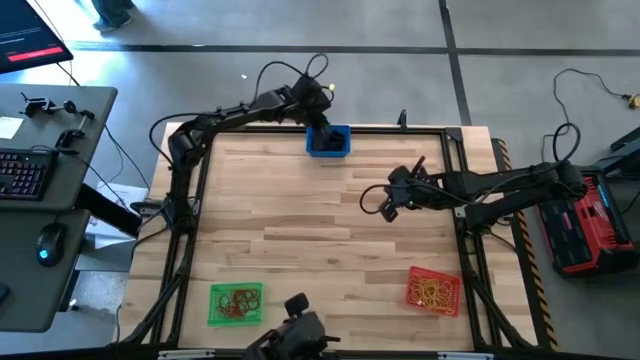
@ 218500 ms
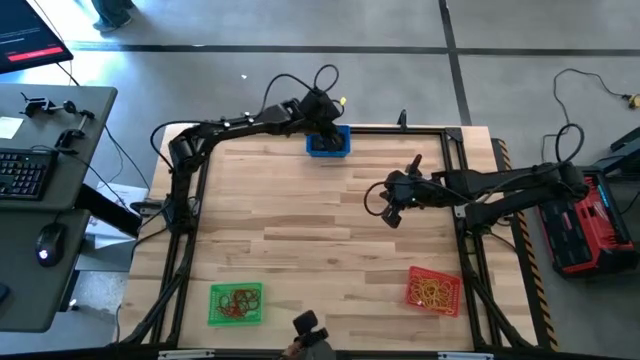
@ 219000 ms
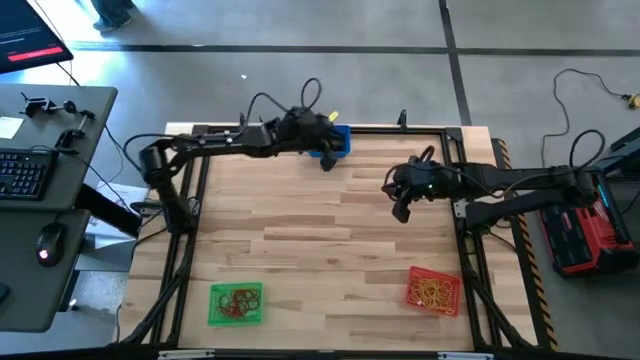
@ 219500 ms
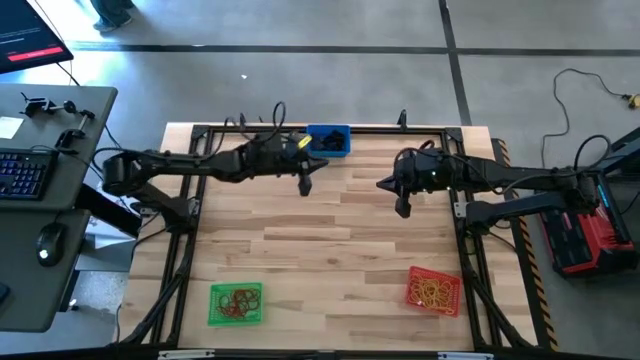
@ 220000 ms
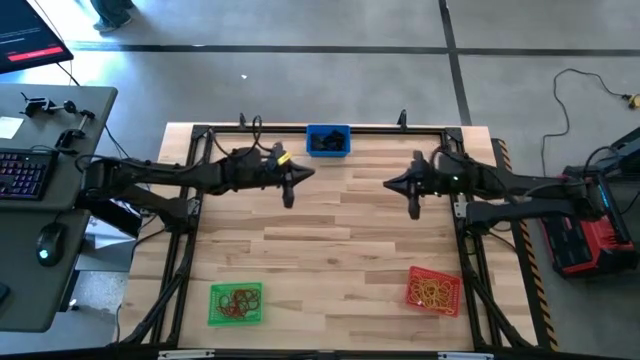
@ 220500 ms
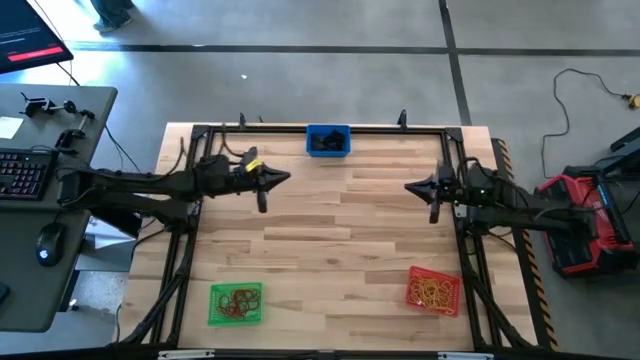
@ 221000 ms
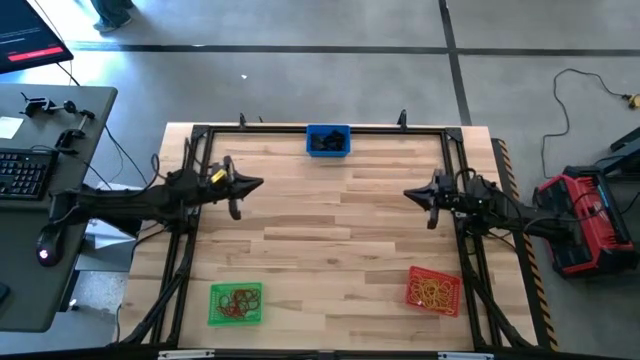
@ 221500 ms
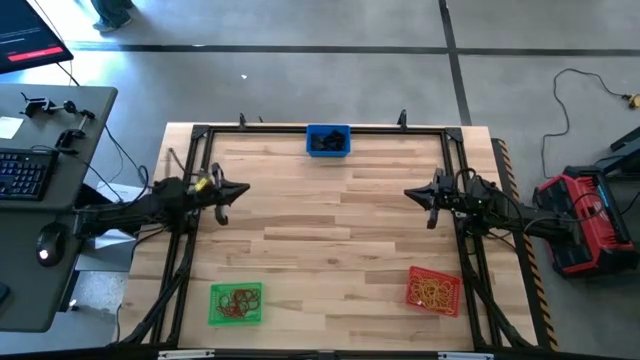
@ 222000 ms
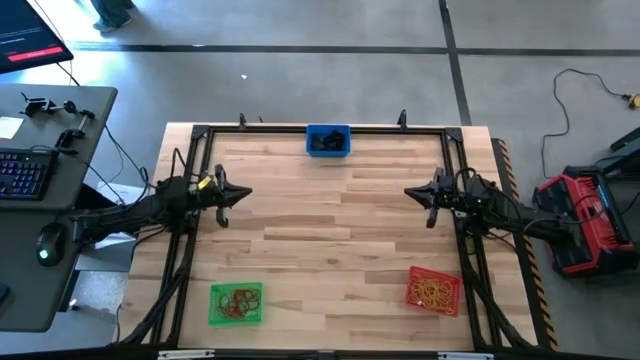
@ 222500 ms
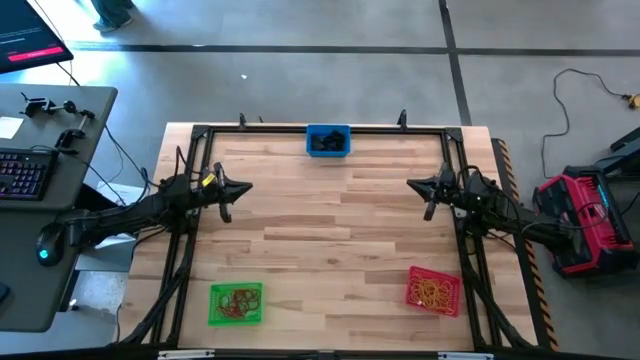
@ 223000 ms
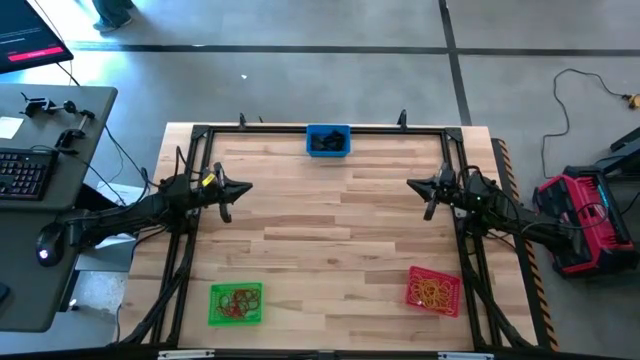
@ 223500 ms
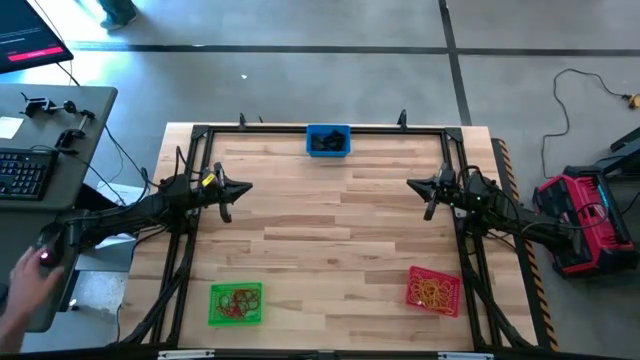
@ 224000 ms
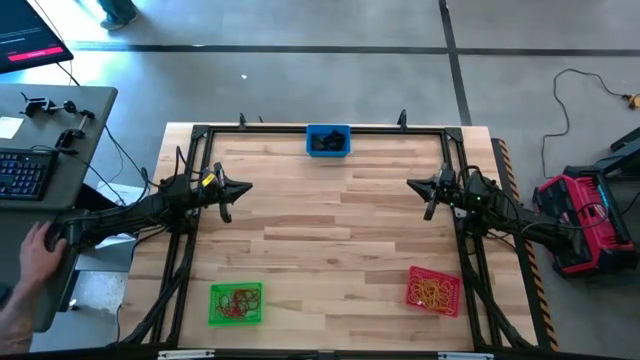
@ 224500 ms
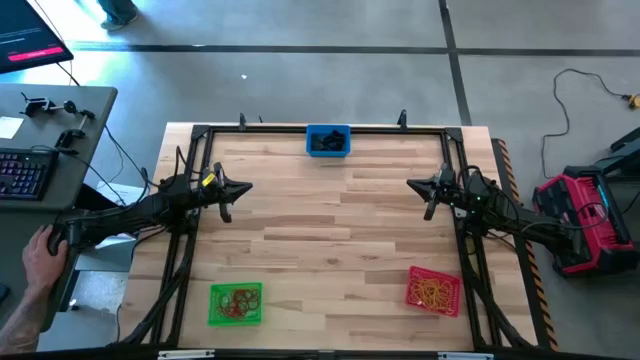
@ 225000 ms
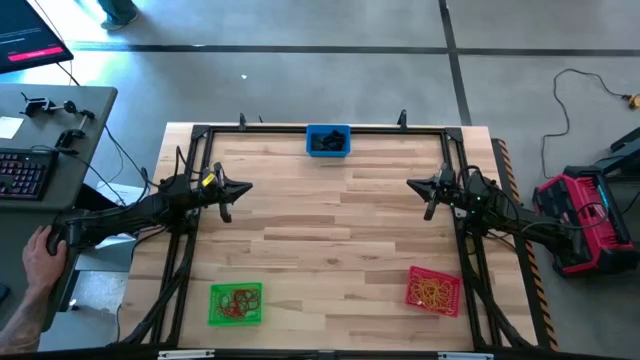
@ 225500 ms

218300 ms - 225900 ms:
Task: Sort rubber bands into baskets
Return to Home Position

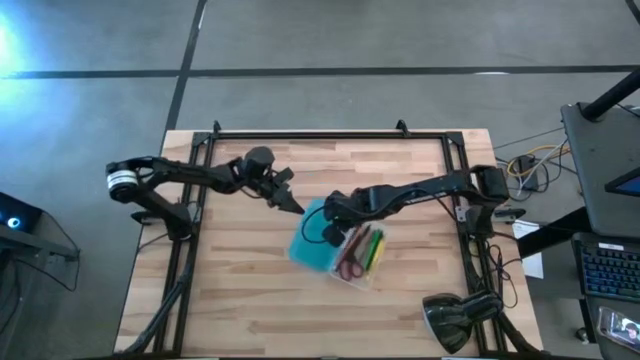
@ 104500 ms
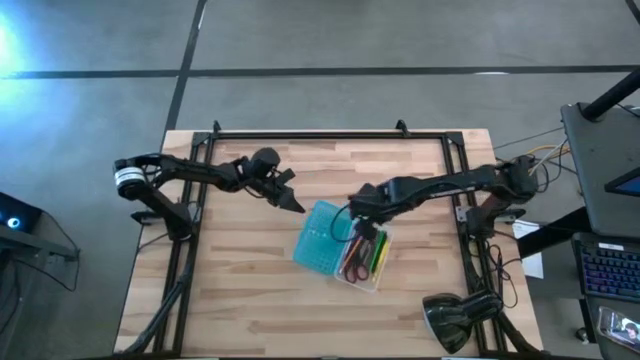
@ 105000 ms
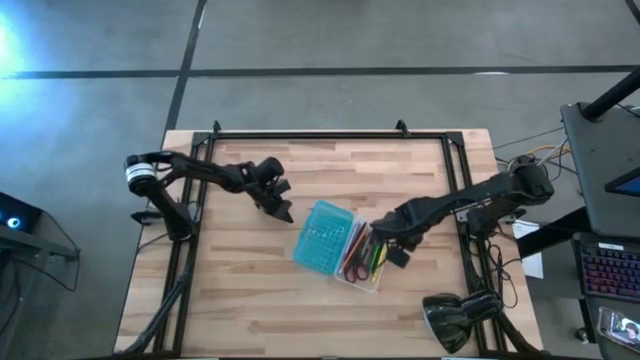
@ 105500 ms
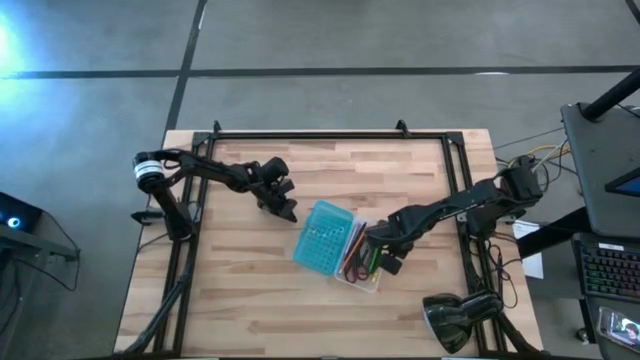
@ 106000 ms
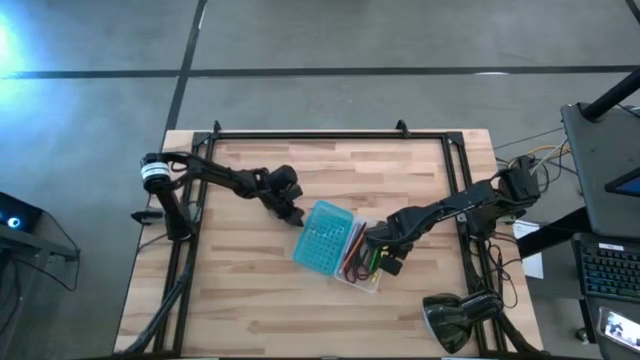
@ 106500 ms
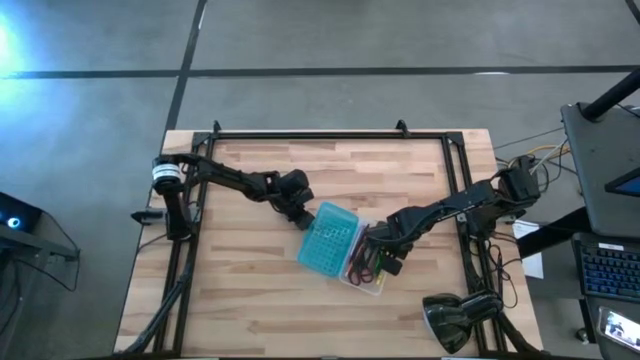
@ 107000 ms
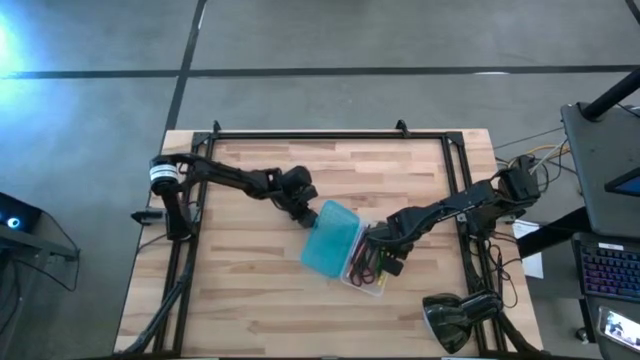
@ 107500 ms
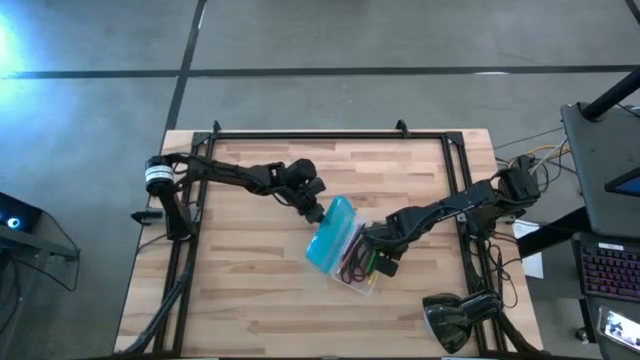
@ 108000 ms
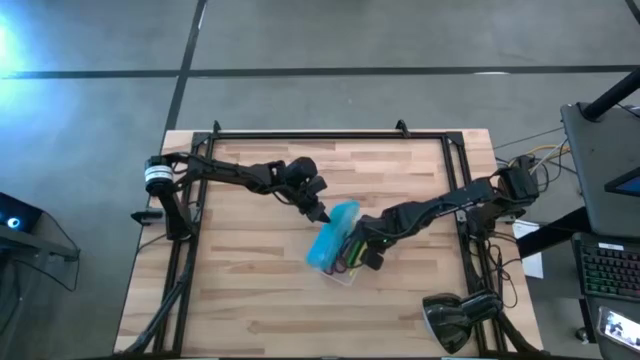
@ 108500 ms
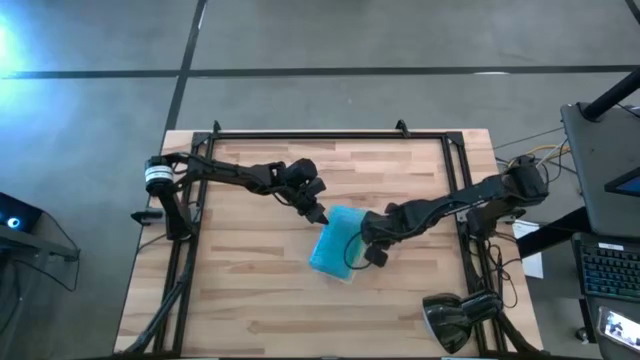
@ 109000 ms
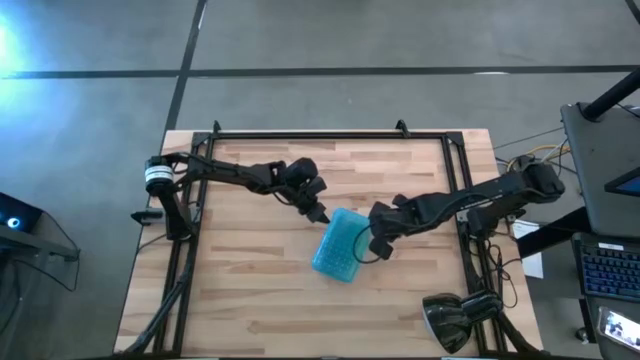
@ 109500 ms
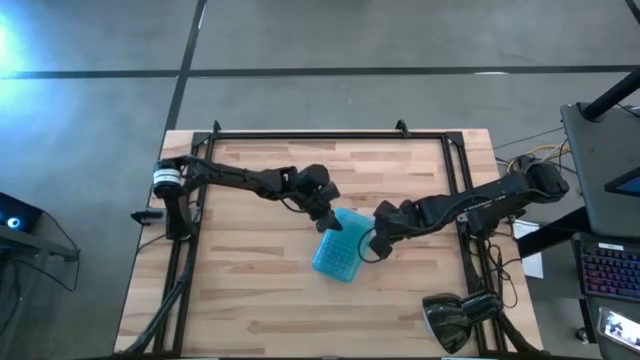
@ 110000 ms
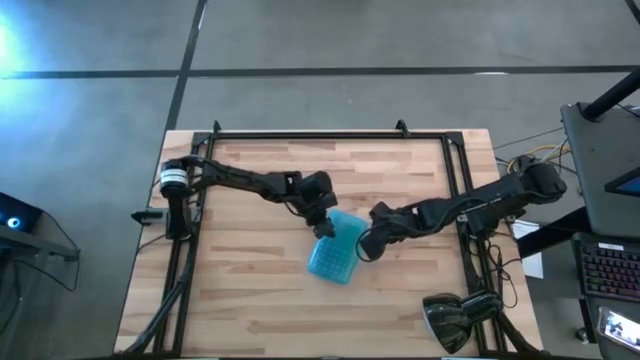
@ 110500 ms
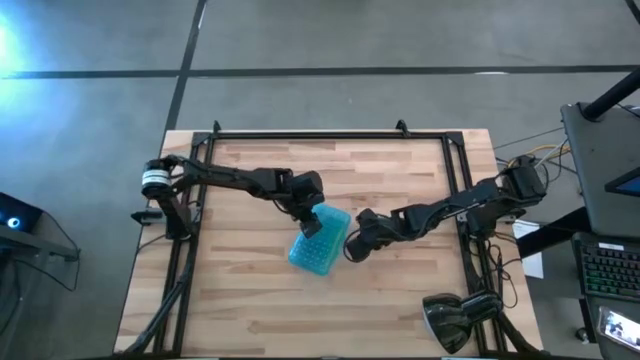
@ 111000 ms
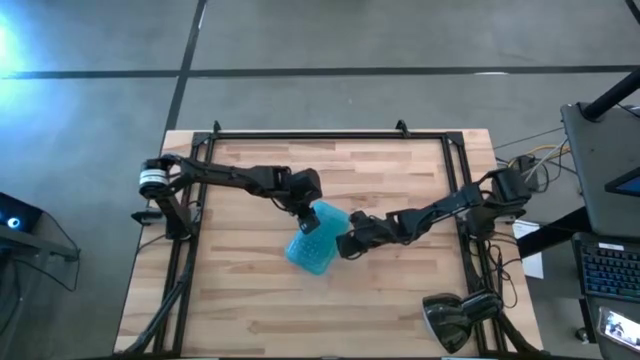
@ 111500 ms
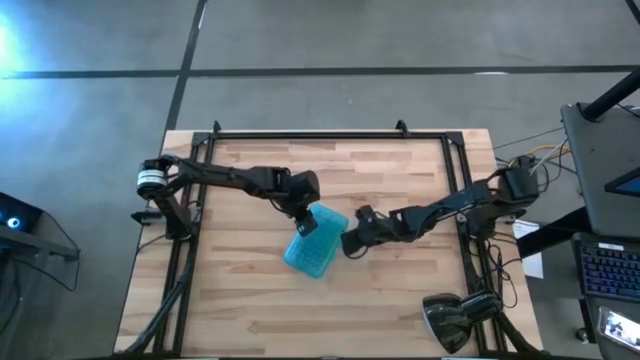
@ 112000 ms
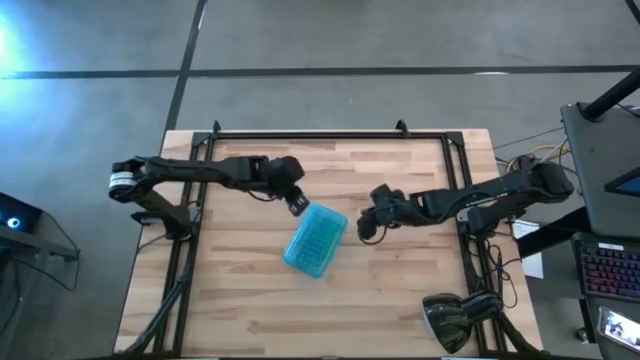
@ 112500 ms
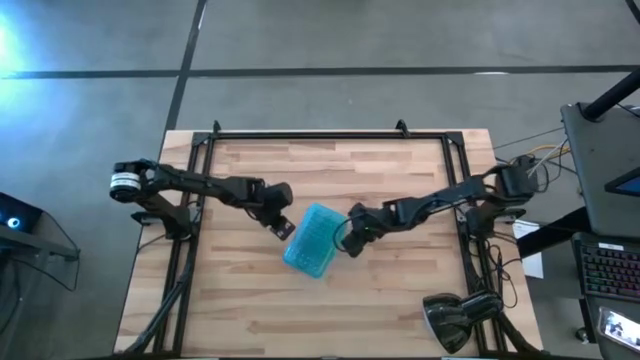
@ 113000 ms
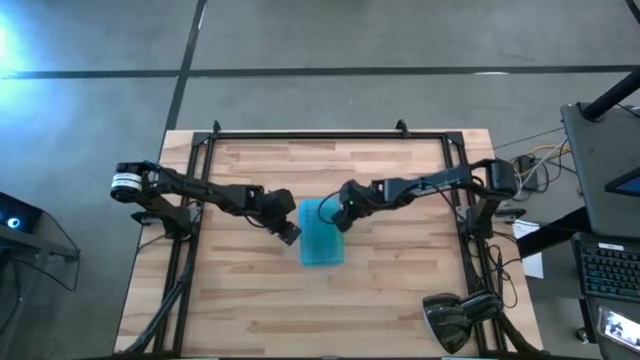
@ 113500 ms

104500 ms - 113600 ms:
Task: Pick & place school supplies into a supply box
Close the blue supply box

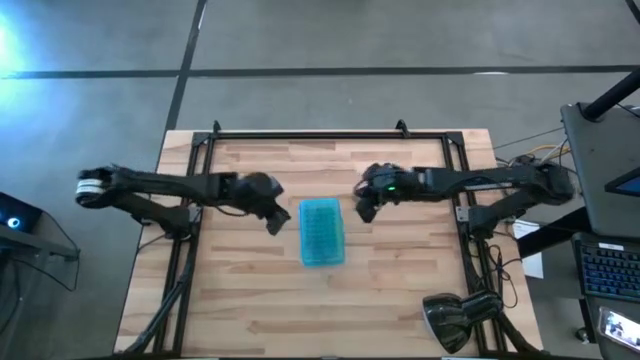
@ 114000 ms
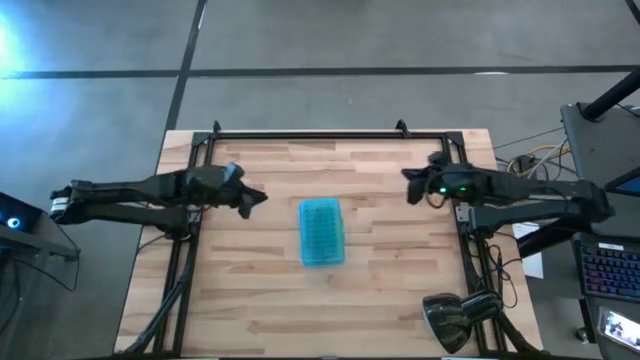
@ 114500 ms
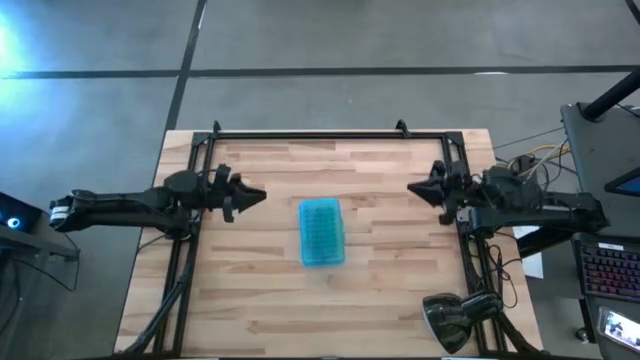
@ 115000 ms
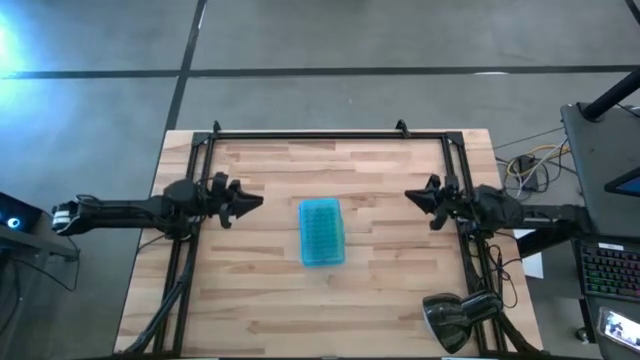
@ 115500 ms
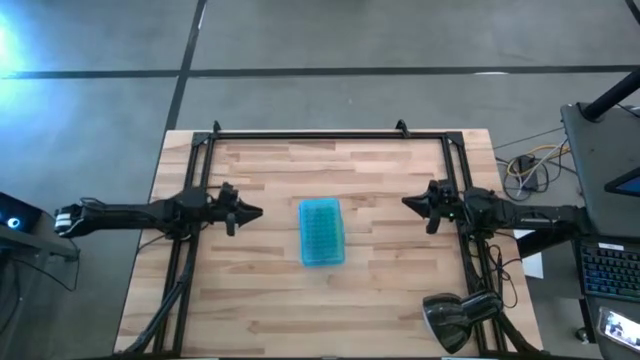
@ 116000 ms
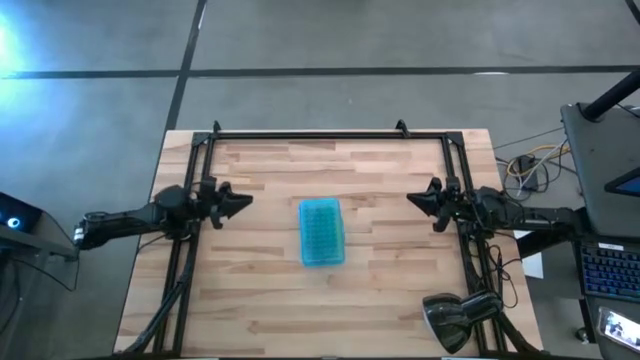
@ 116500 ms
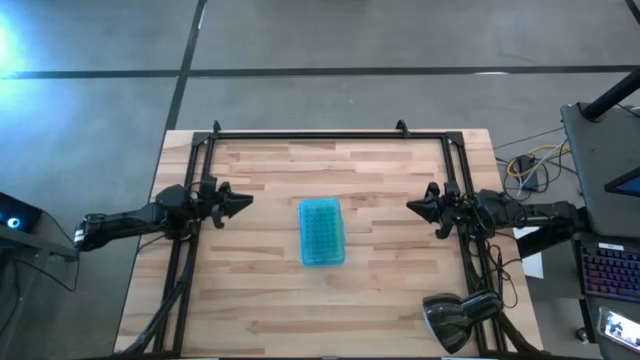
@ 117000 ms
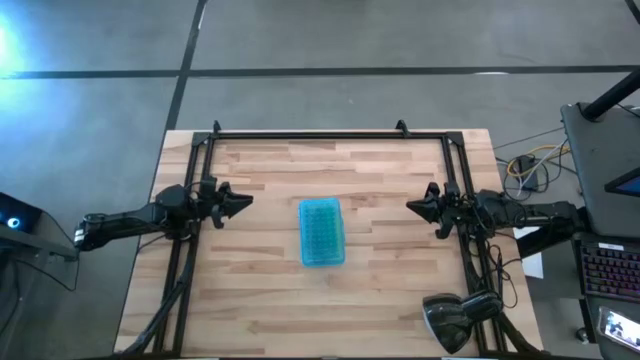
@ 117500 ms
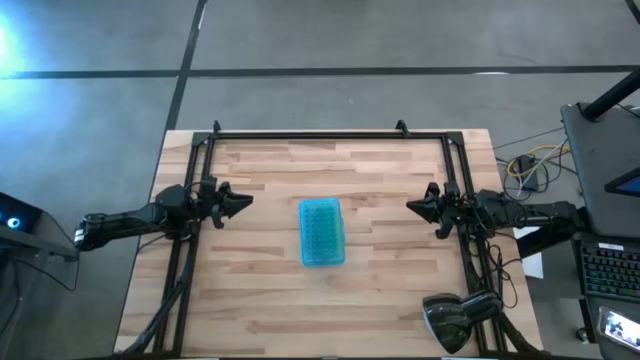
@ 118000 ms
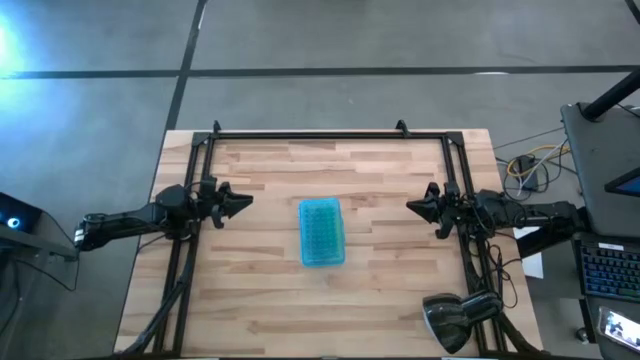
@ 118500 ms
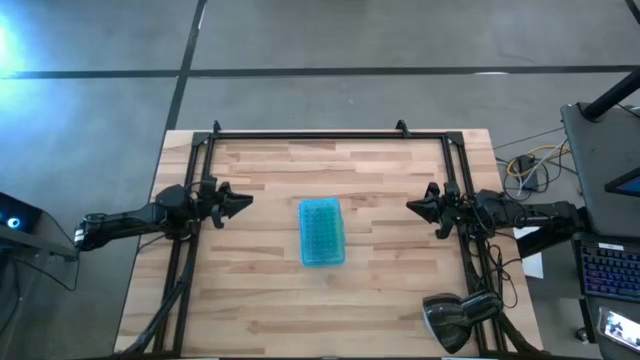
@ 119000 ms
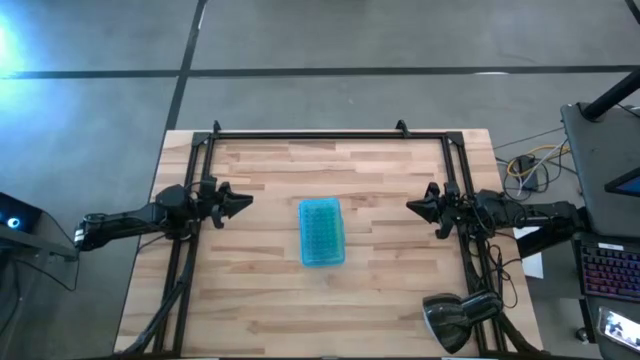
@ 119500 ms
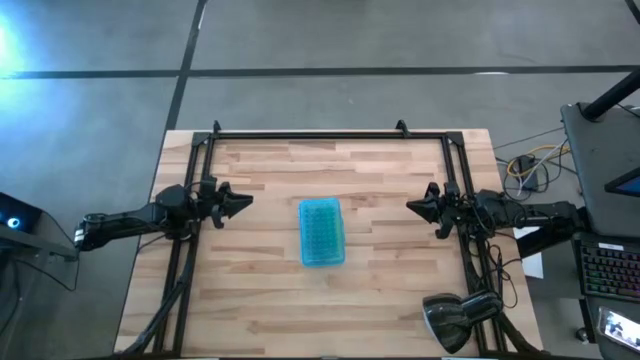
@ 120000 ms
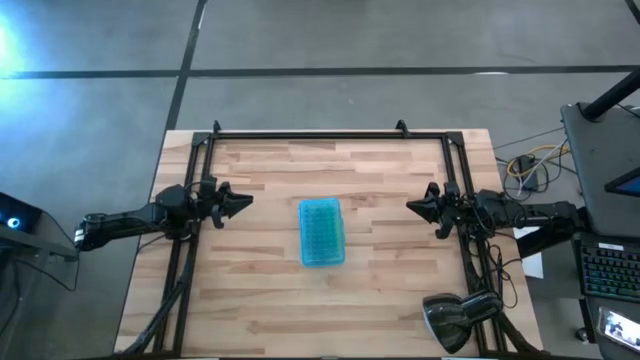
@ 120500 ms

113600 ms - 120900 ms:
Return to Home Position
